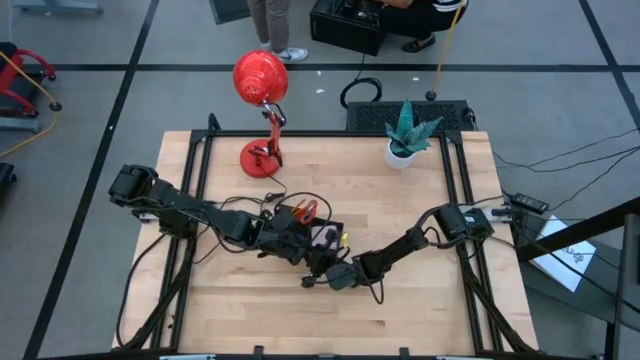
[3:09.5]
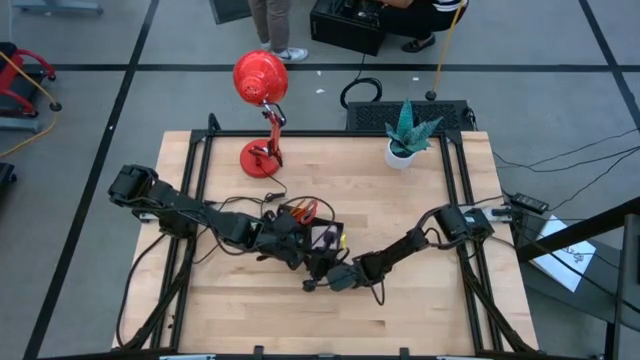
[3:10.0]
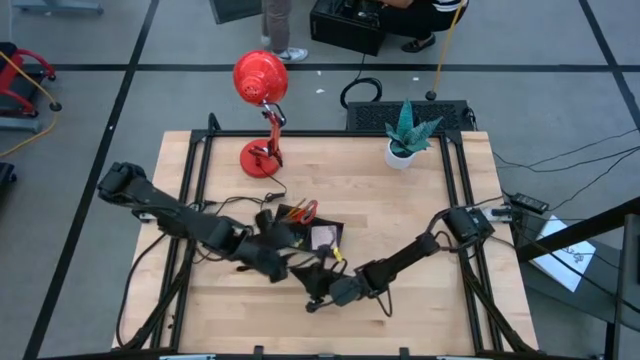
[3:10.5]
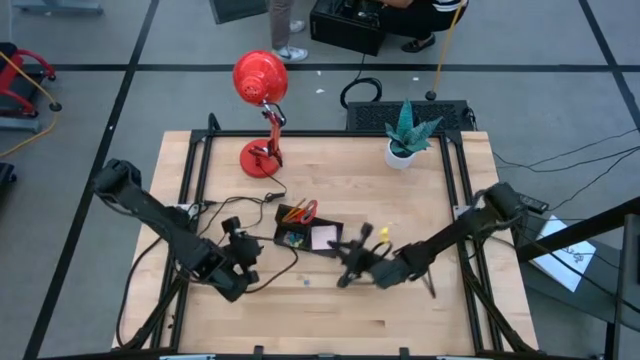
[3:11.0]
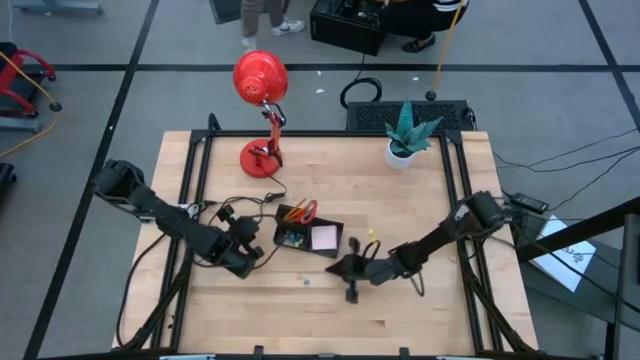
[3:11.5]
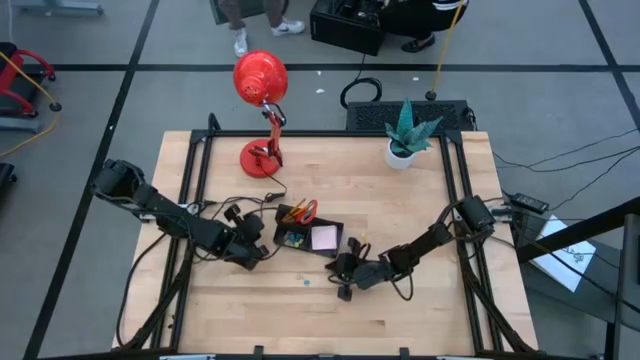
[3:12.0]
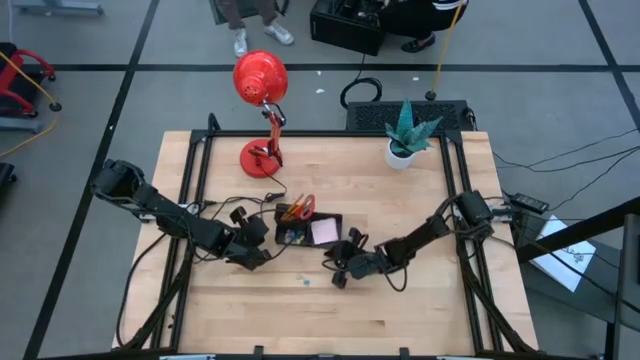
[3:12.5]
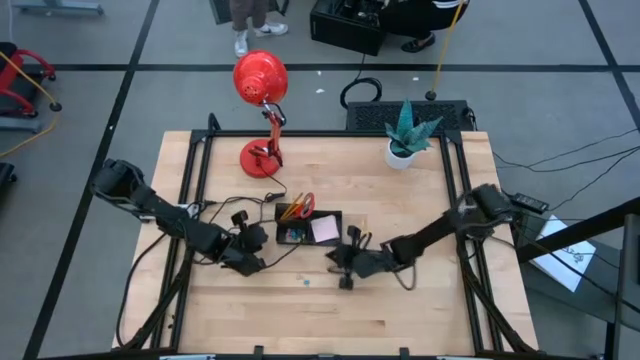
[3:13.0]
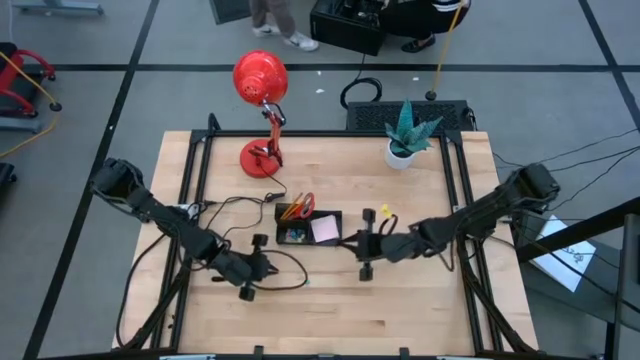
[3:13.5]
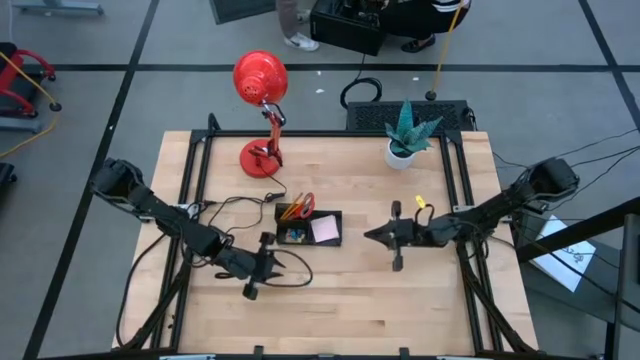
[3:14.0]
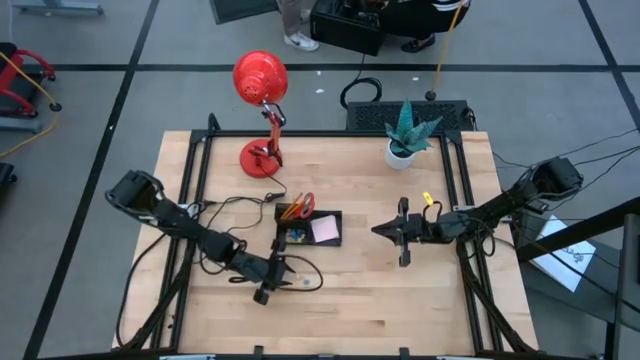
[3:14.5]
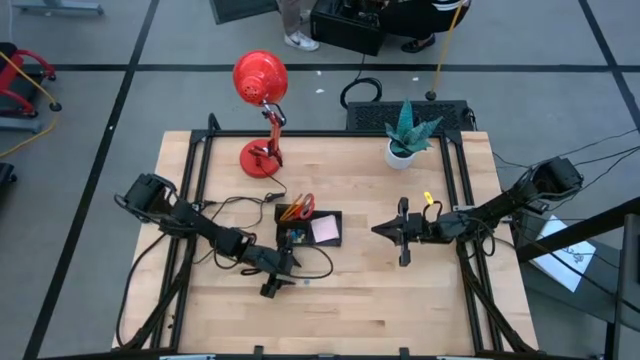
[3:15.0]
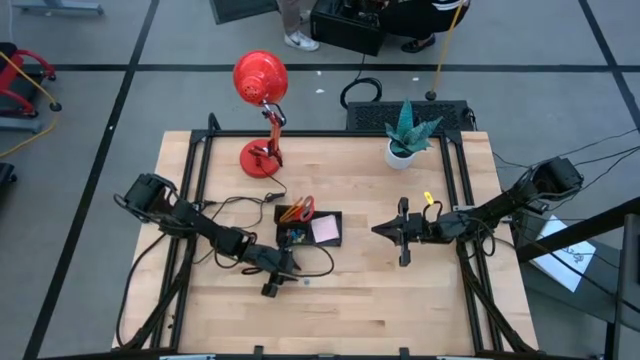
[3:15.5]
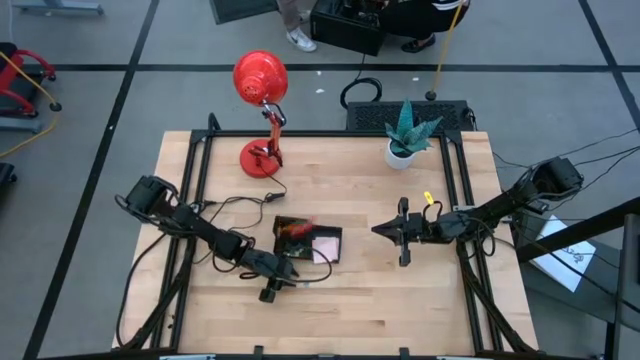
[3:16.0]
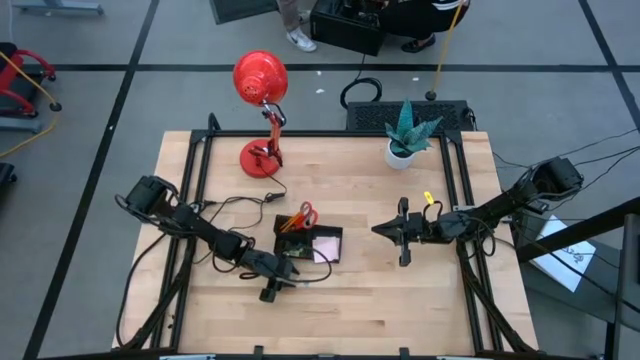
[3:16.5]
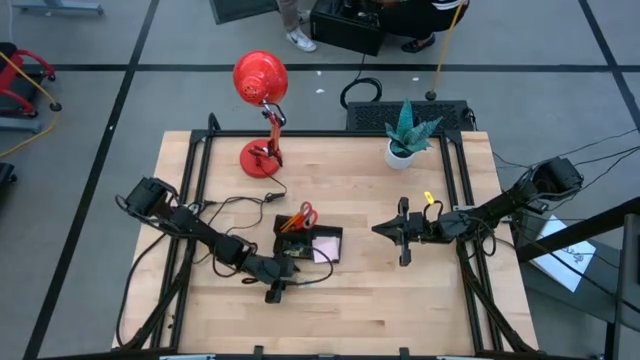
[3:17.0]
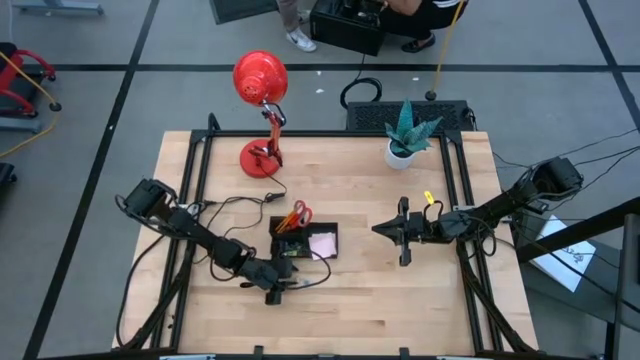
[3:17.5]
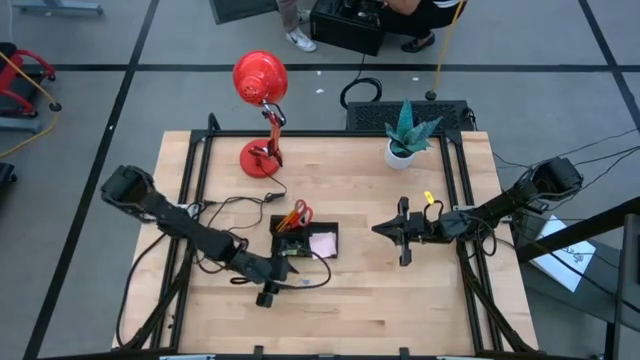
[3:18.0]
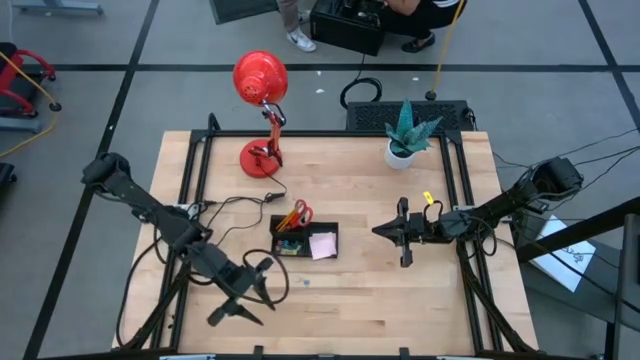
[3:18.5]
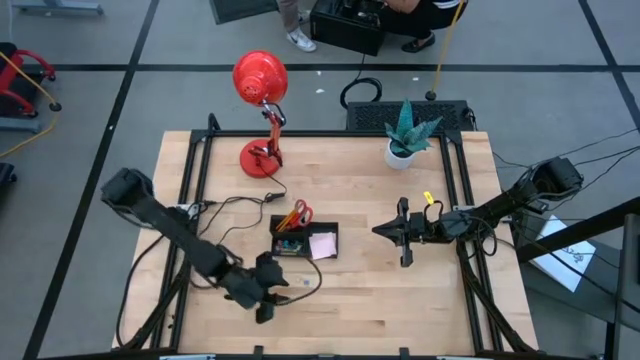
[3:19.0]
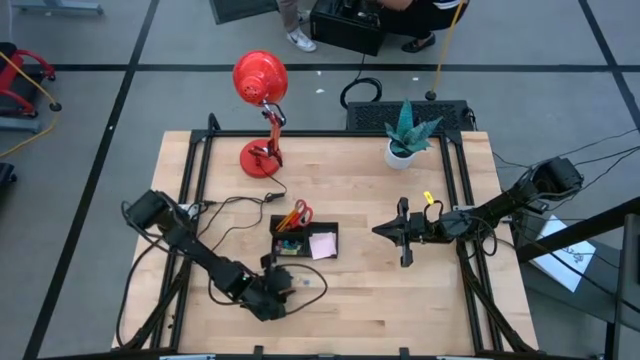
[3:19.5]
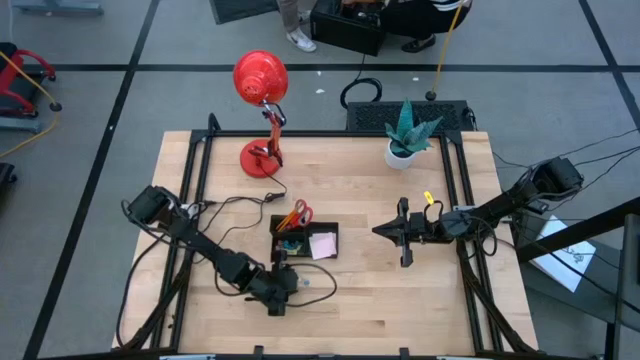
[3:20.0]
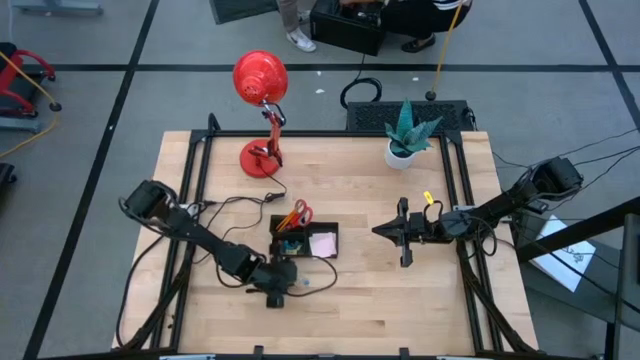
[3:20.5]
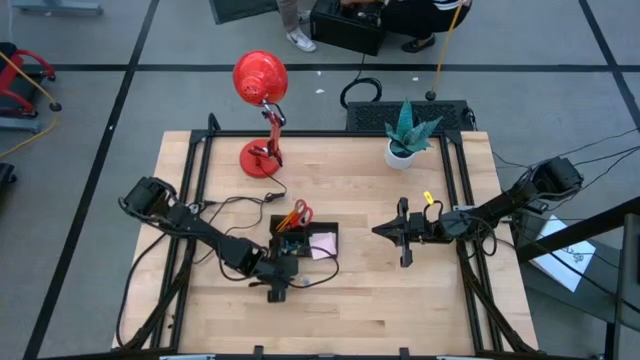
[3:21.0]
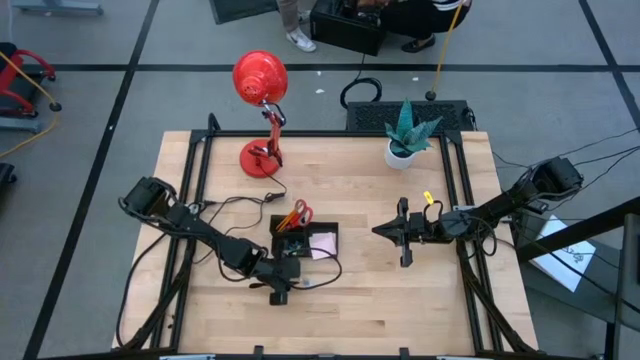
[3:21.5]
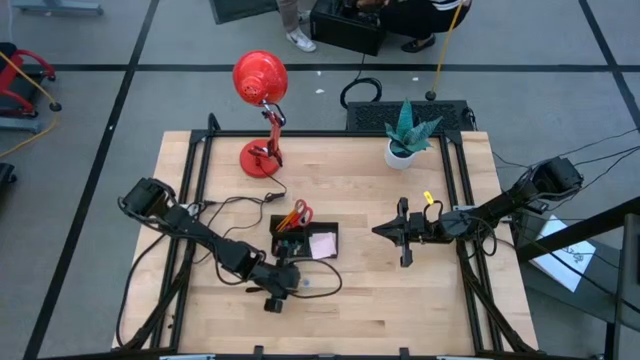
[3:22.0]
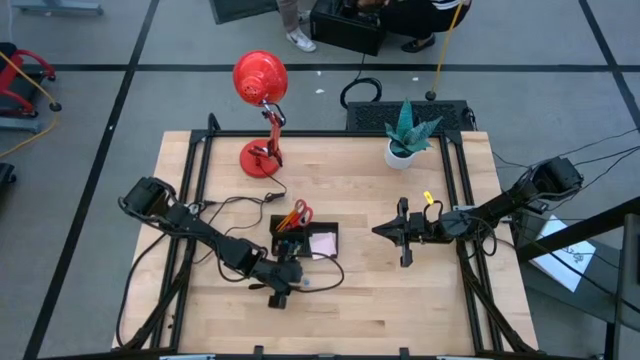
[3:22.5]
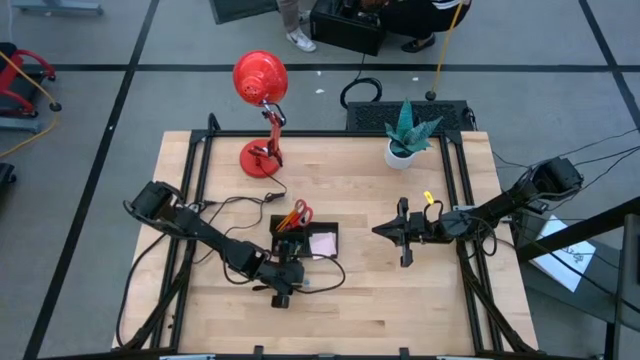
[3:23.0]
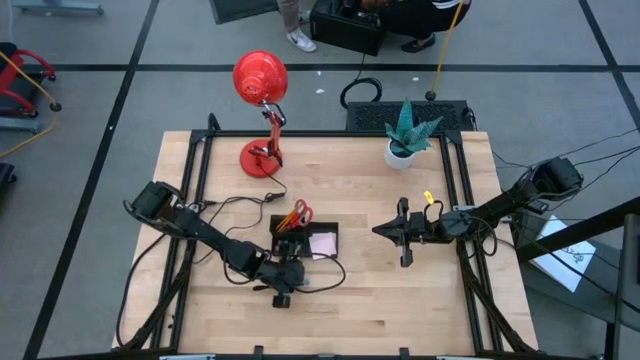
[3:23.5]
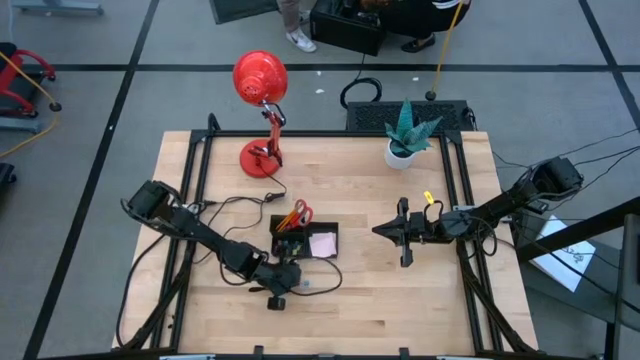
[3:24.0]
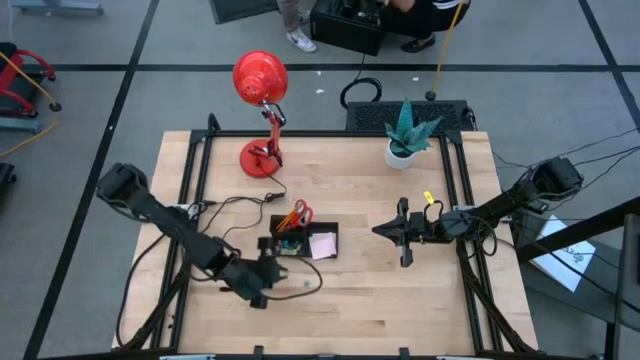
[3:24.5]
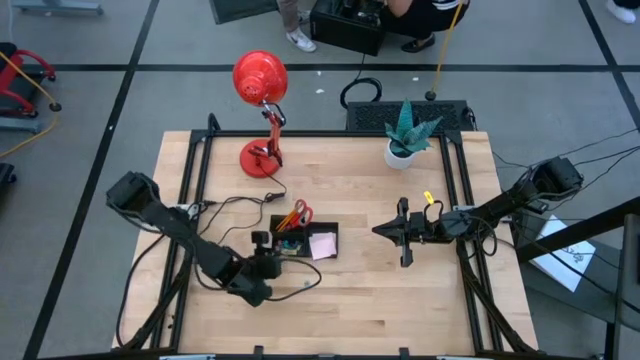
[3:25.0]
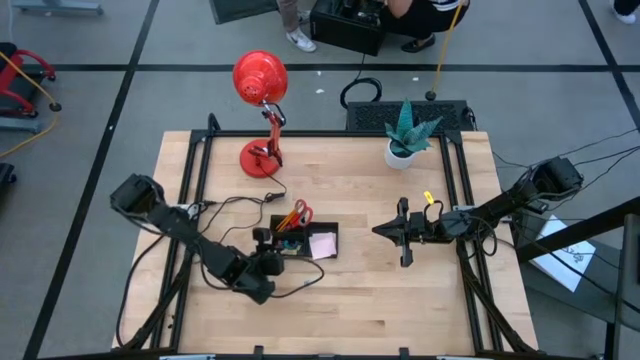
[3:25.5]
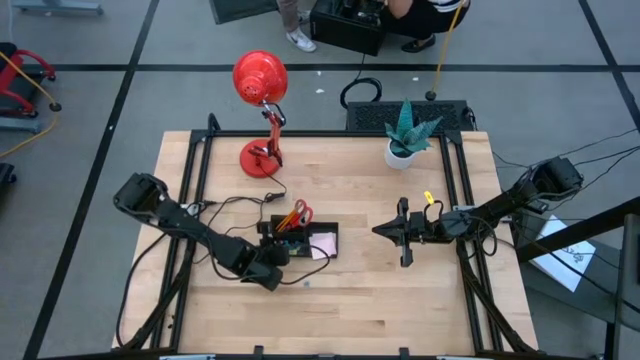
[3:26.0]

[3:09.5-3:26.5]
Task: Pick and place office supplies into organizer
Put the green binder clip into the desk organizer

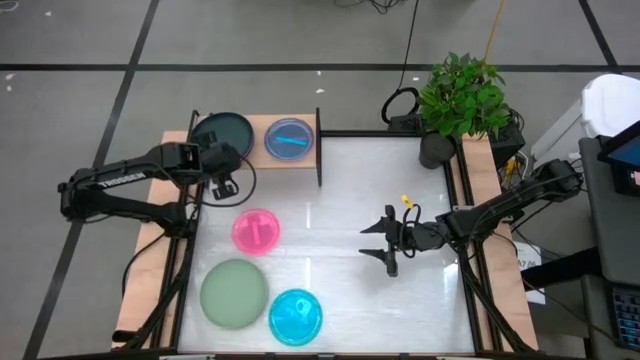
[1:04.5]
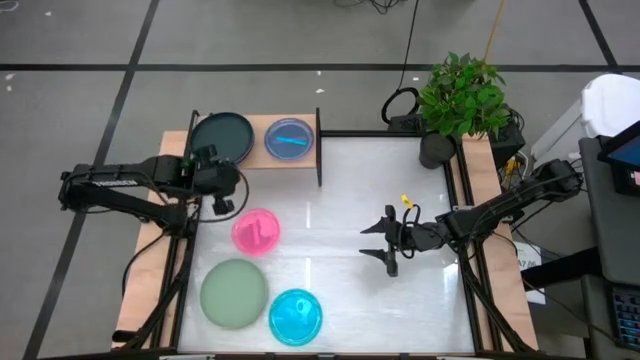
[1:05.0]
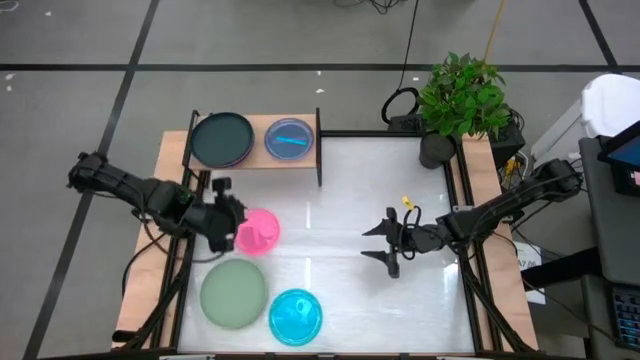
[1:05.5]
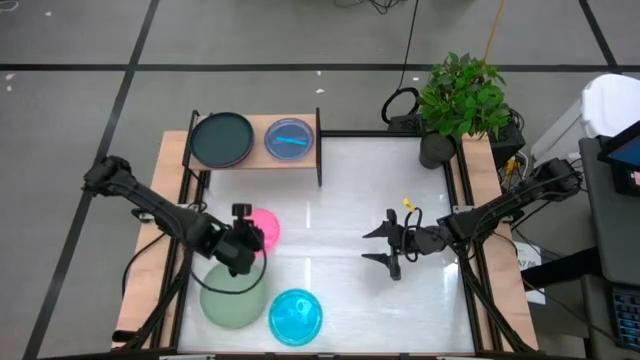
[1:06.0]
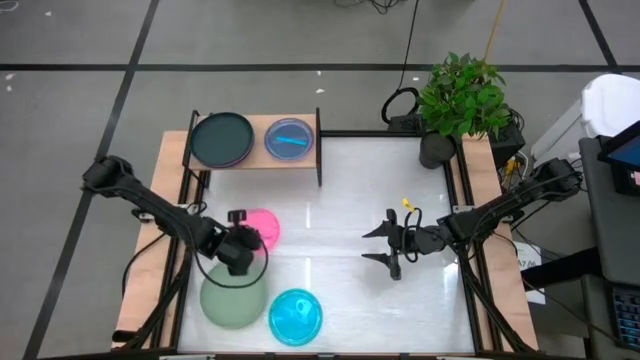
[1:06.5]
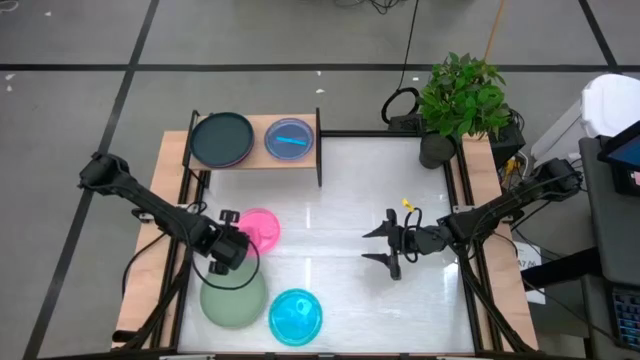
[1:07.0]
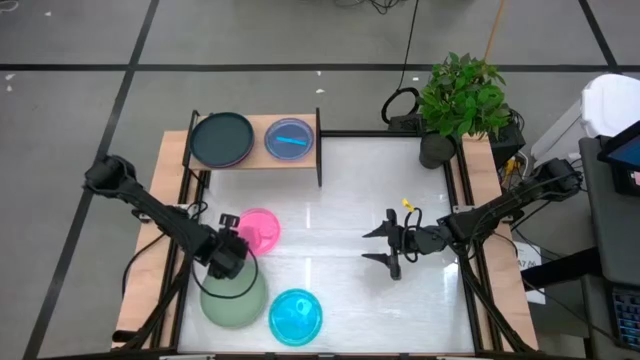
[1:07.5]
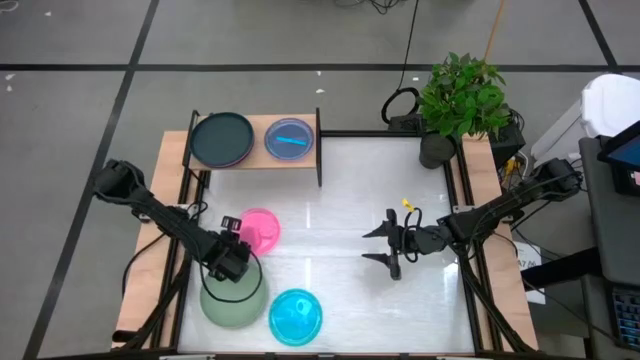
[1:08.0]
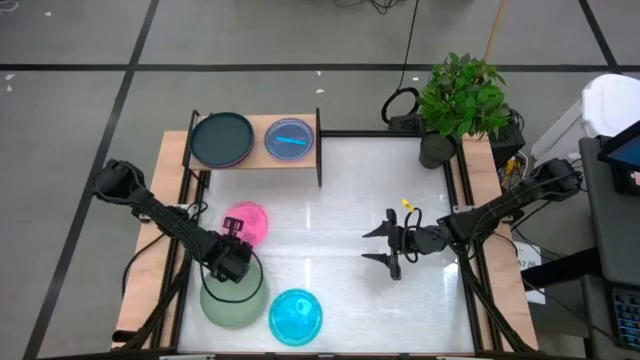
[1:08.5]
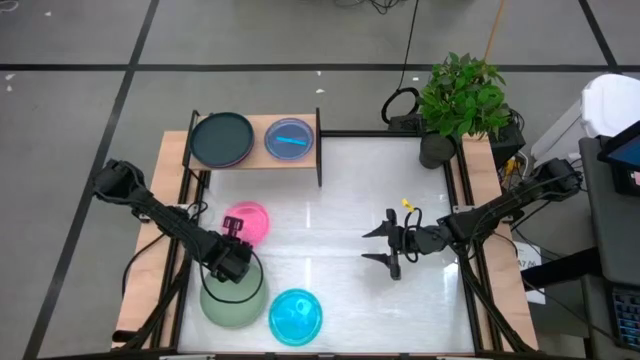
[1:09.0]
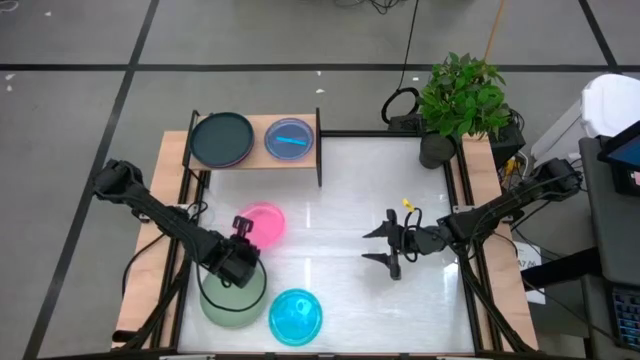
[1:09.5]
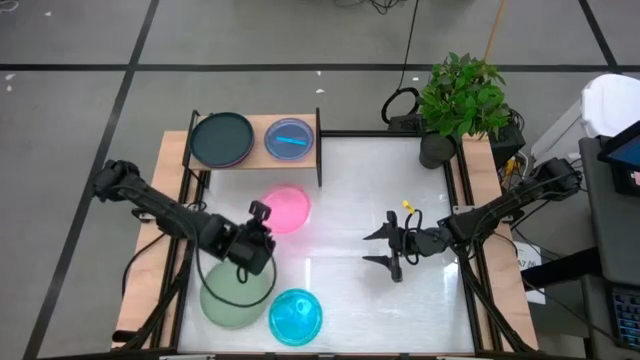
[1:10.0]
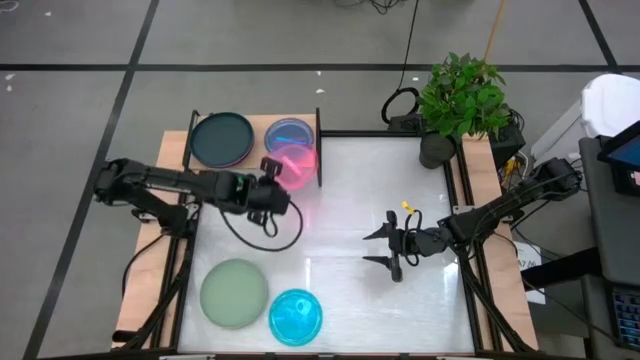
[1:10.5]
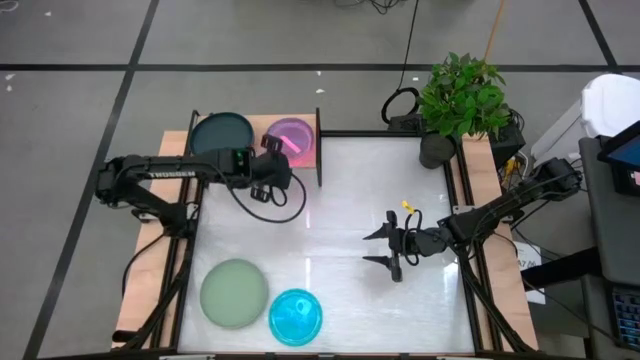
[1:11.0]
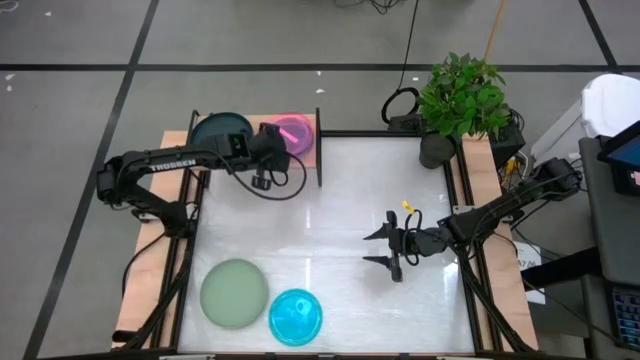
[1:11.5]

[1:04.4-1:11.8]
Task: Place and stack plates onto a shelf
Stack the pink transparent plate on top of the blue transparent plate on the shelf
